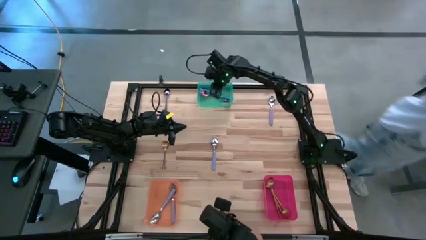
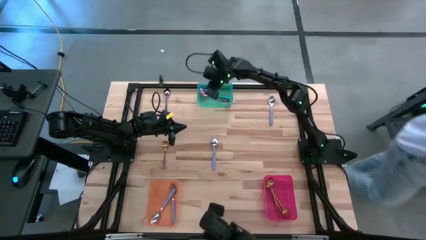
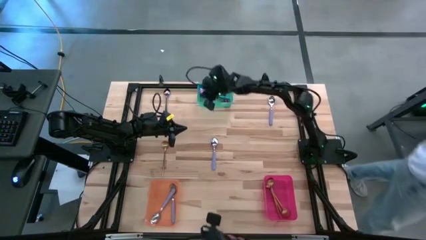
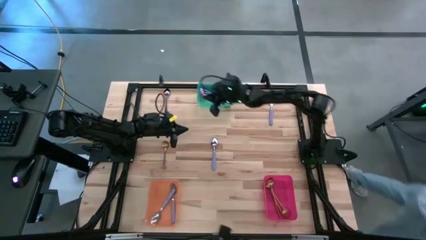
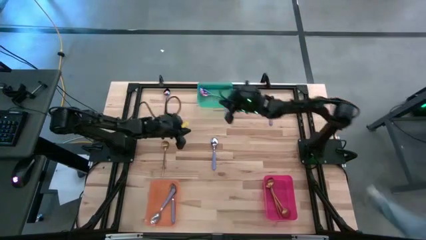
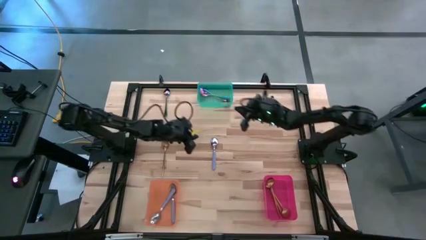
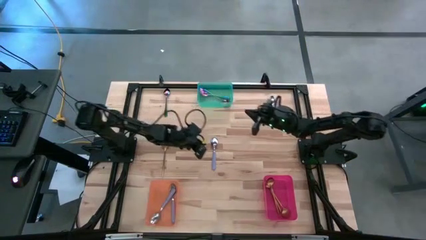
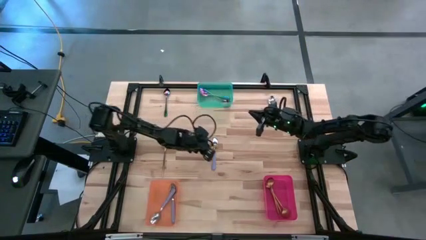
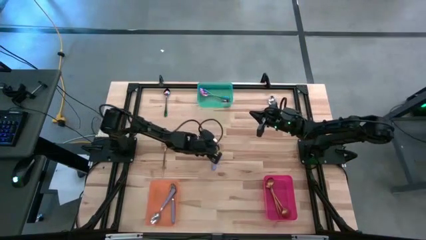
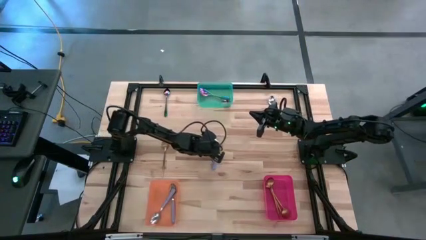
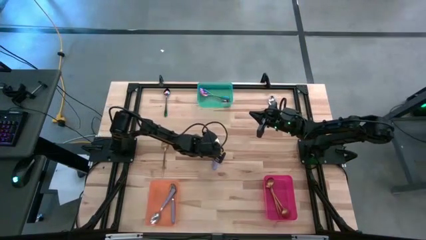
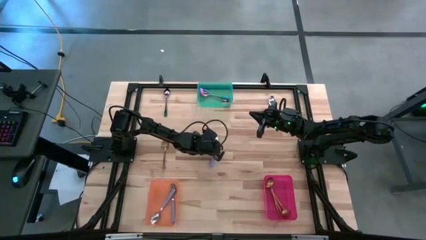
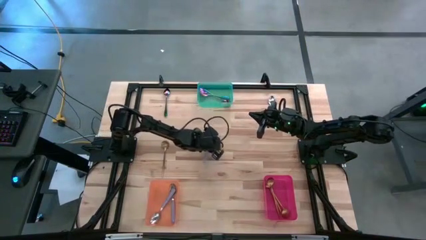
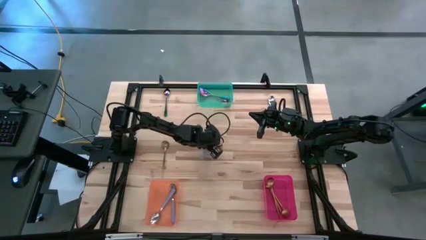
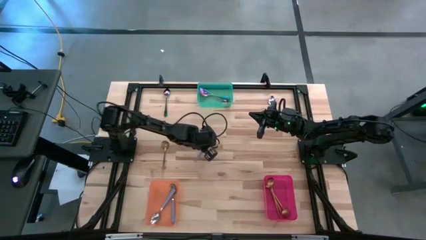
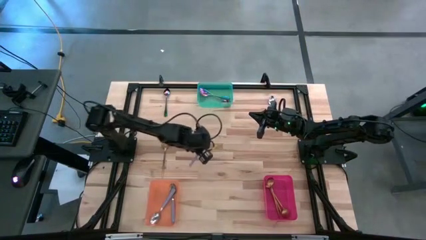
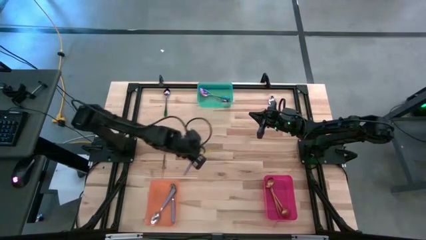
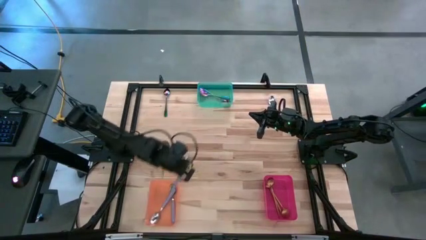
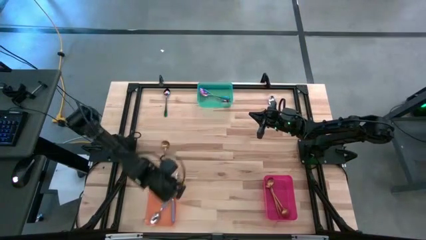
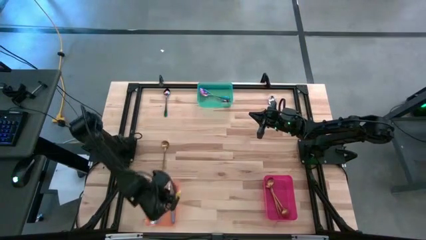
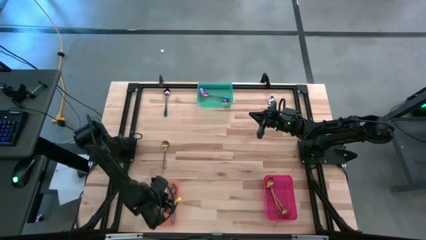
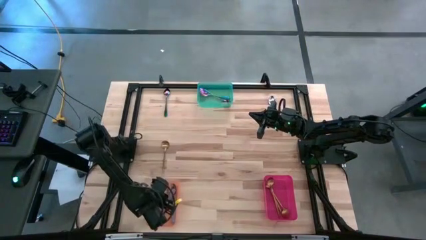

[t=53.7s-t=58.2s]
Task: Sort silverware by color (type)
Put the purple spoon into the orange bin

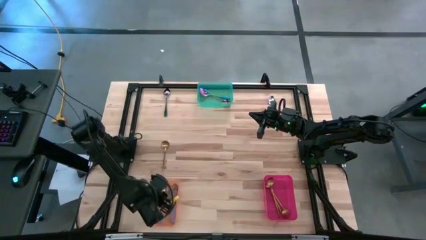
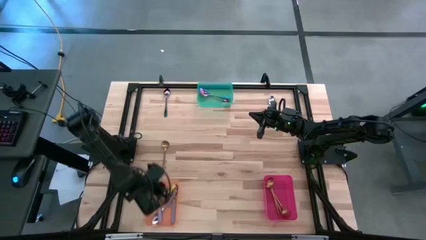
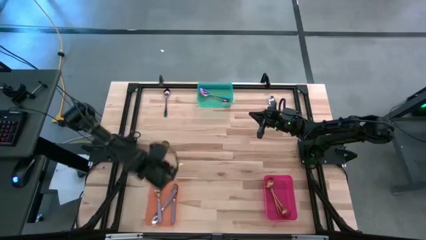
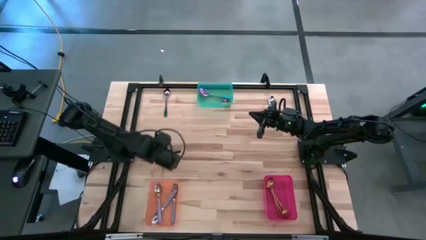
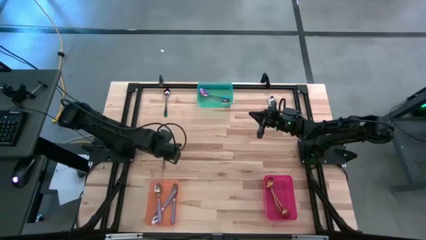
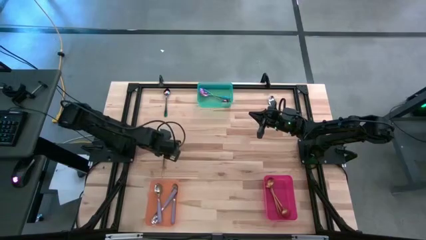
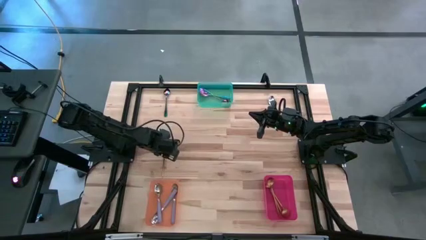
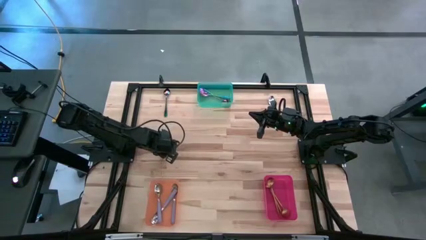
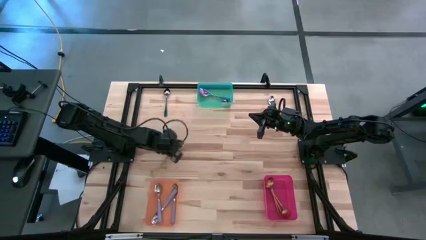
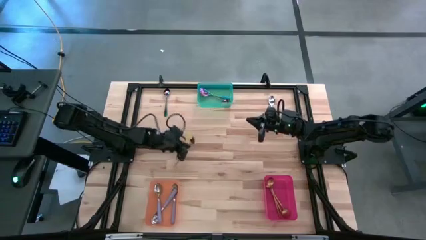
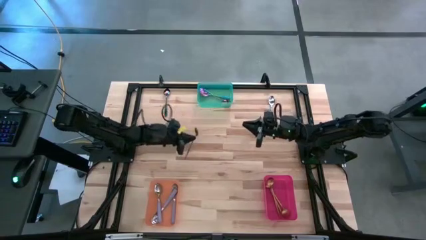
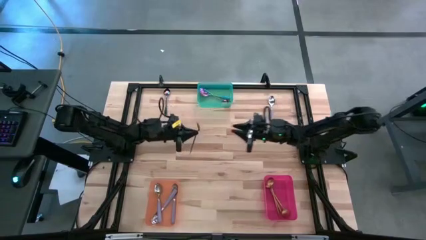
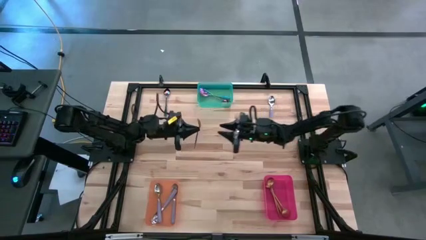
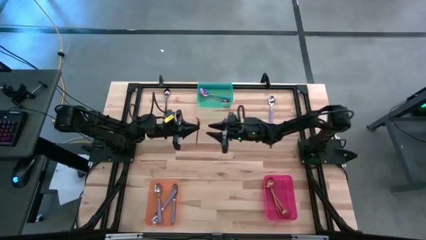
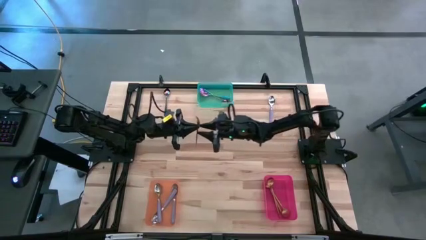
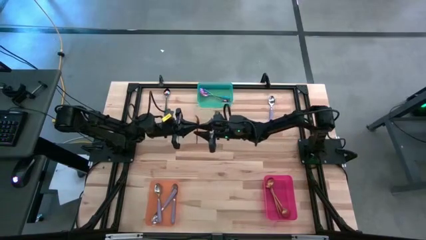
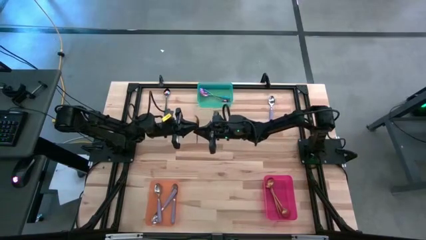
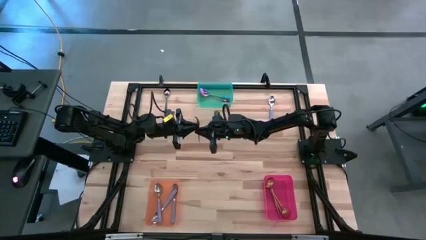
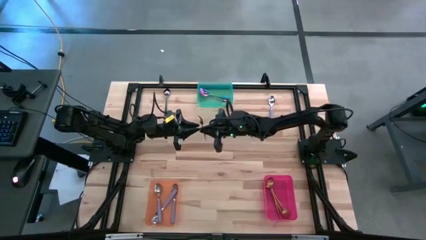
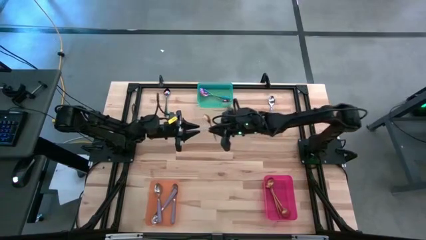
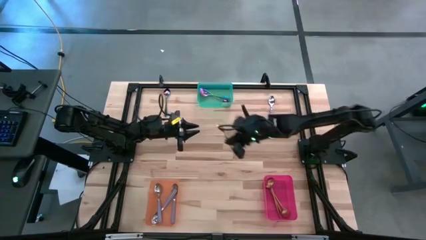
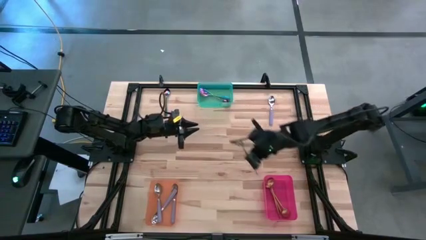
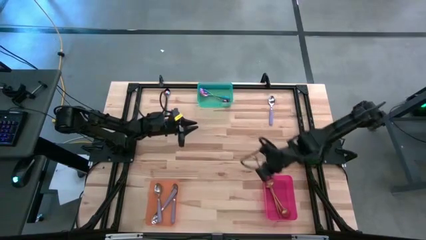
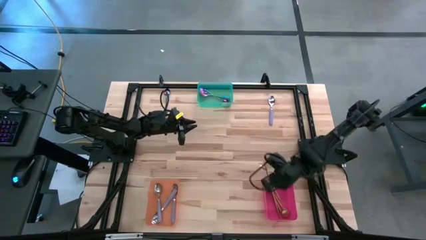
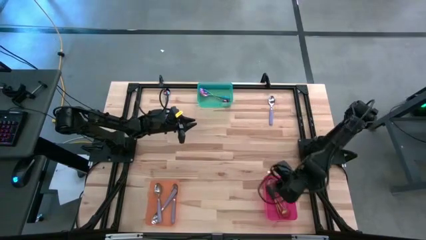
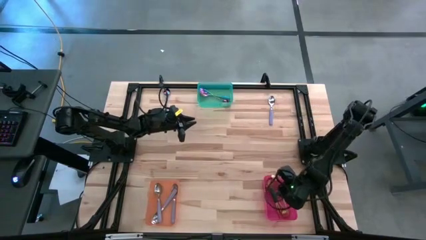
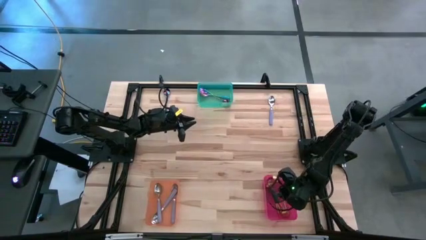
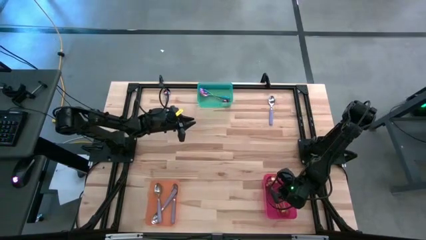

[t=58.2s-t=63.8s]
Put the yellow spoon into the red bin

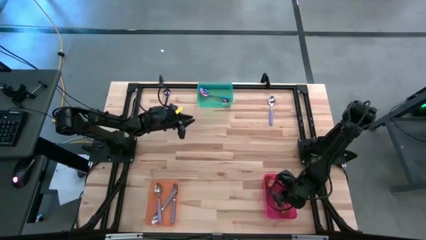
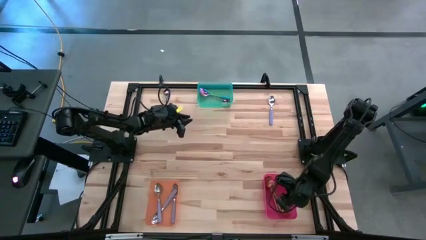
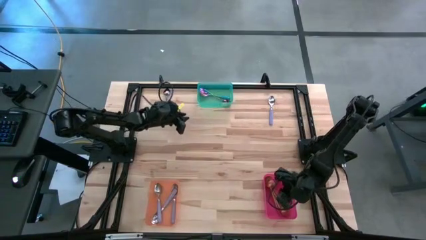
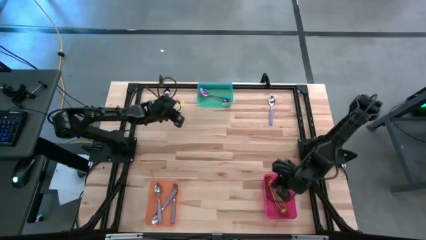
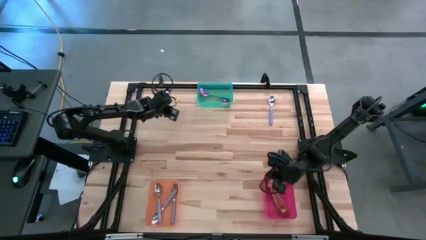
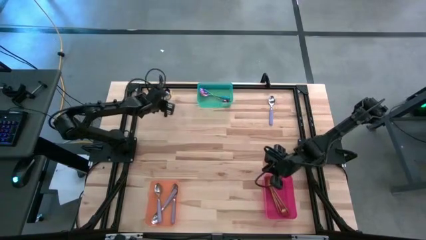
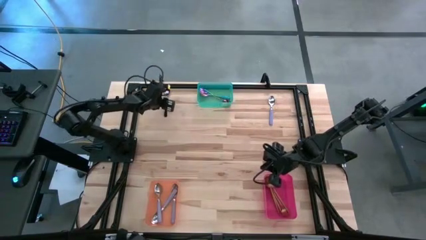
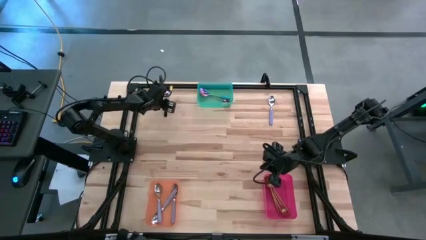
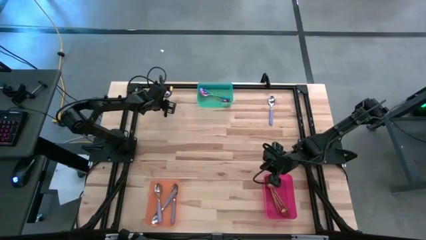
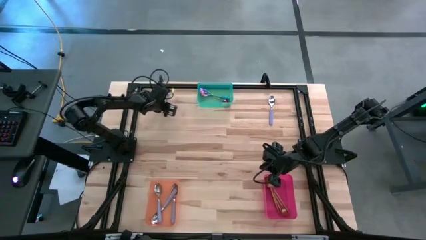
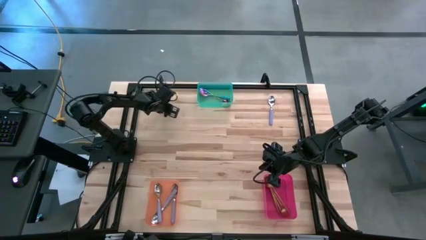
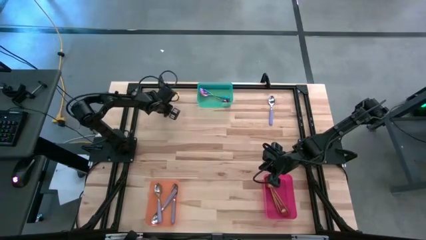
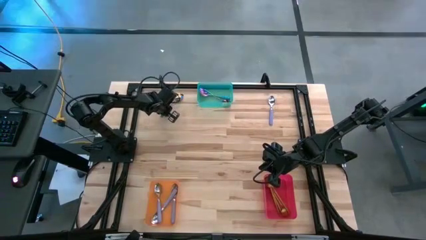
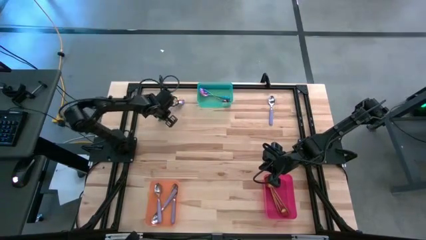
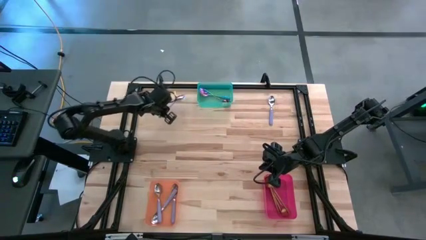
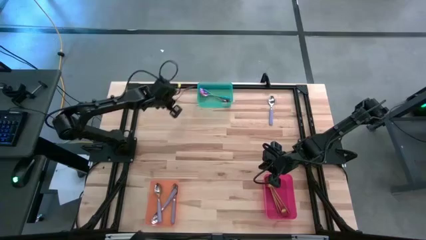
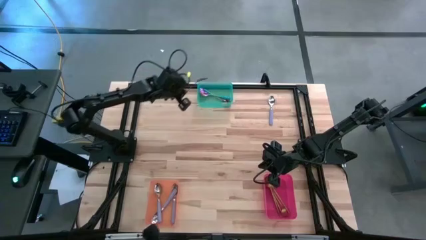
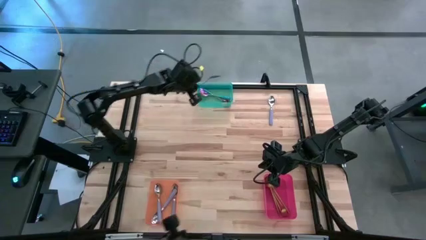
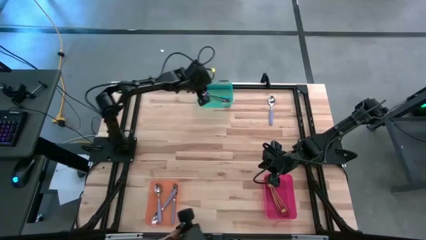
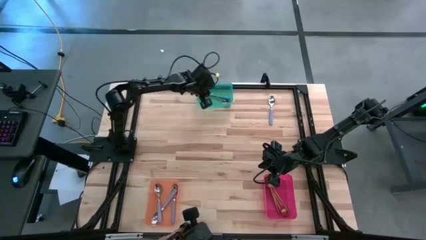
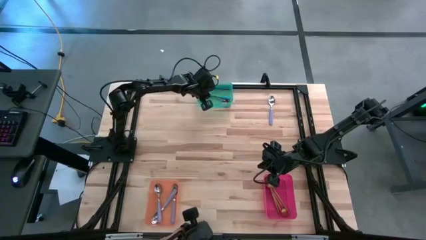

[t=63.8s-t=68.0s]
Put the blue spoon into the green bin

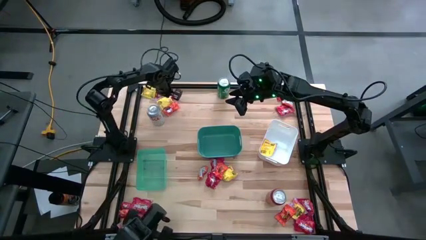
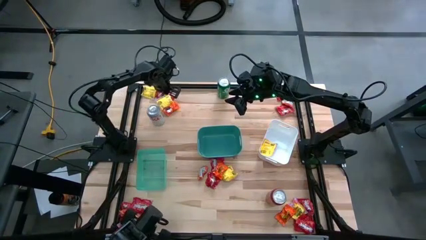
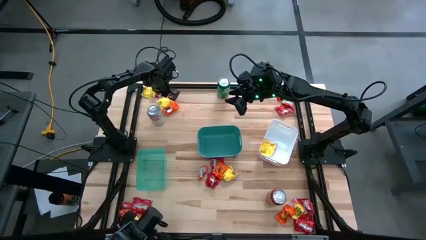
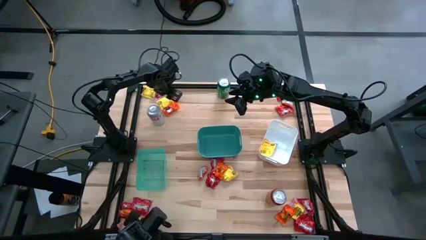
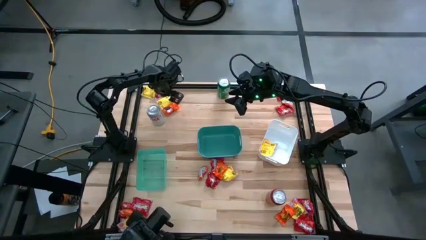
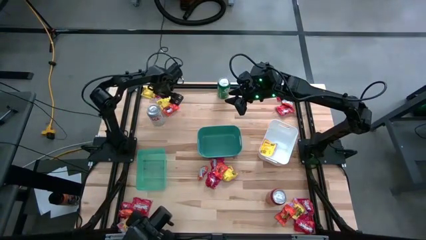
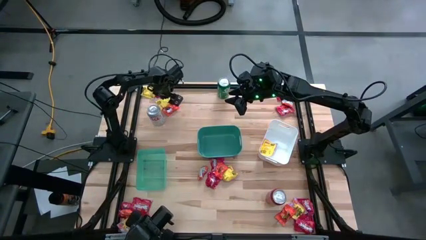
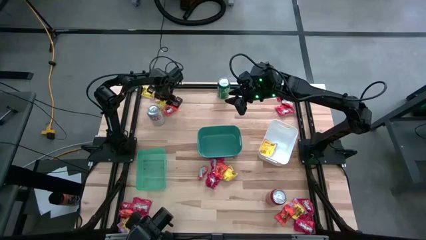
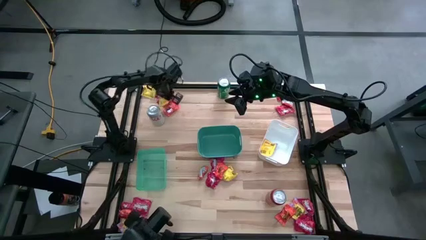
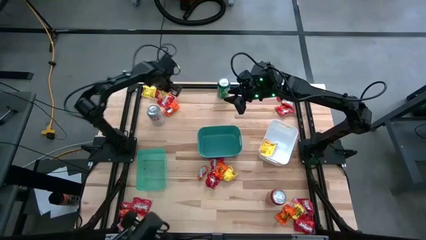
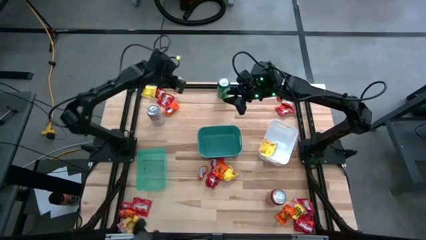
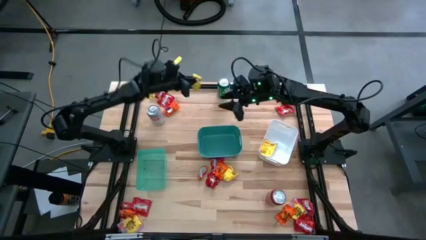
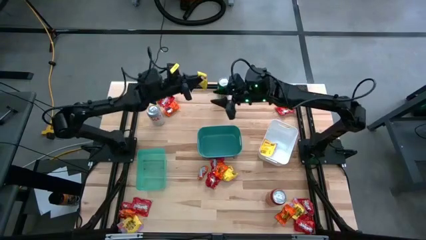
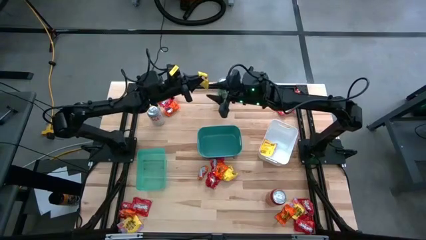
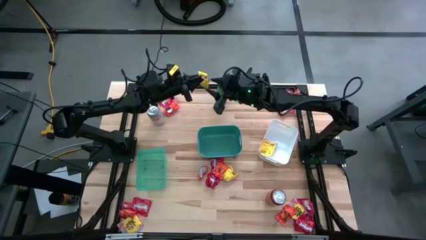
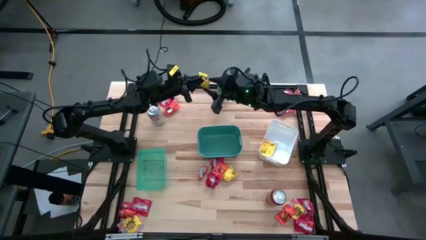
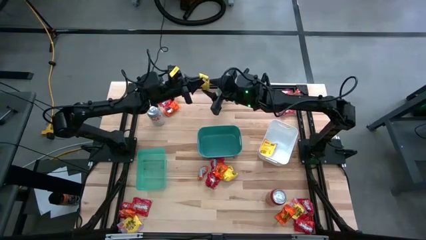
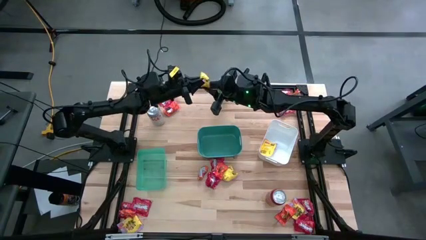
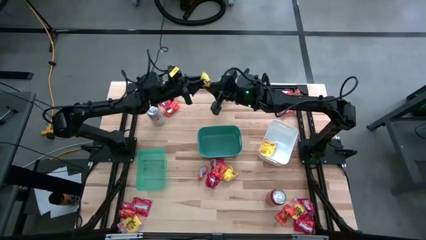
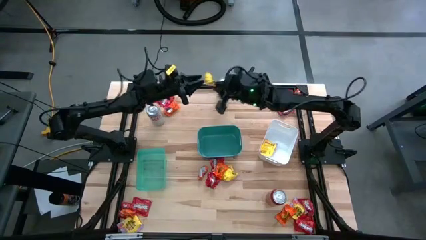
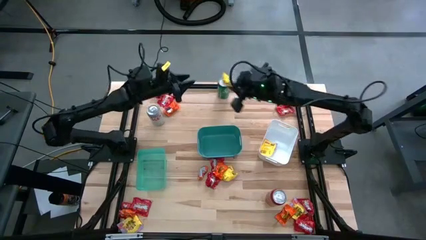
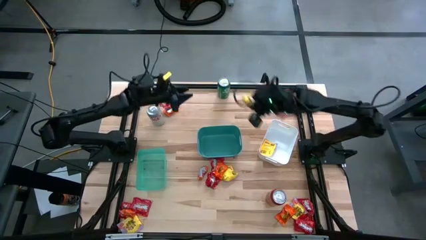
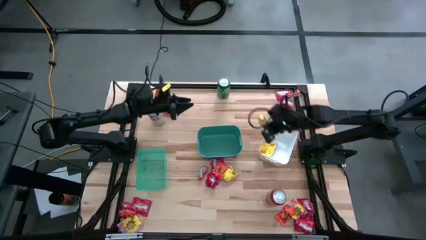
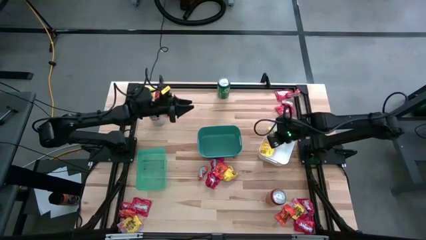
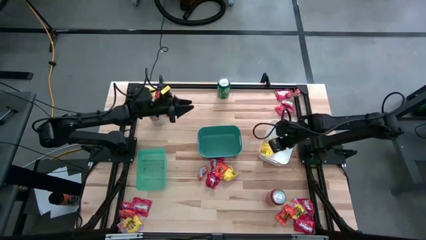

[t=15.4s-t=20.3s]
Task: Sort candy
Put the yellow candy into the white bin
